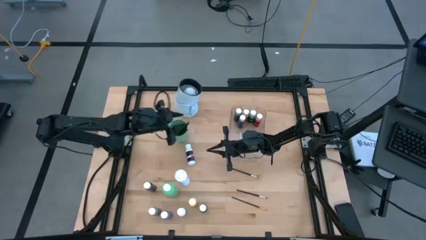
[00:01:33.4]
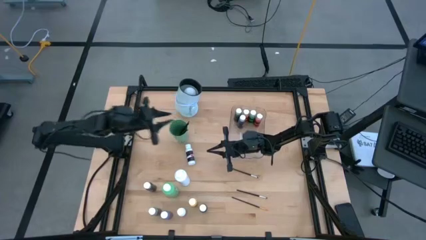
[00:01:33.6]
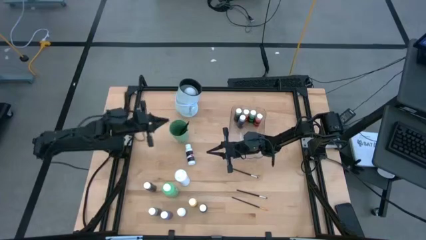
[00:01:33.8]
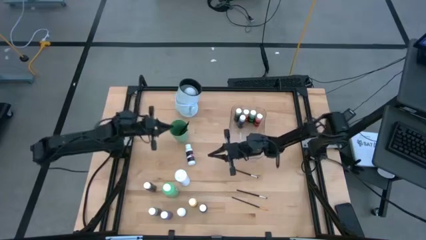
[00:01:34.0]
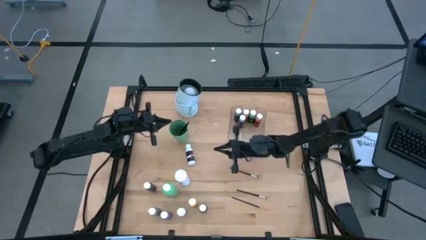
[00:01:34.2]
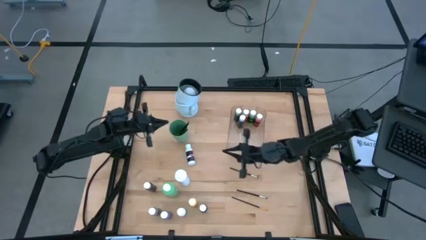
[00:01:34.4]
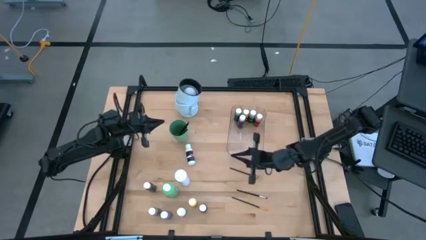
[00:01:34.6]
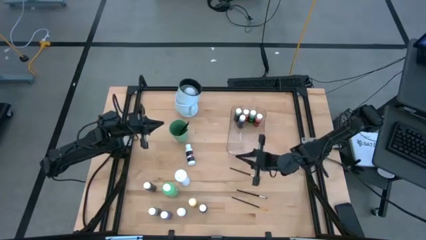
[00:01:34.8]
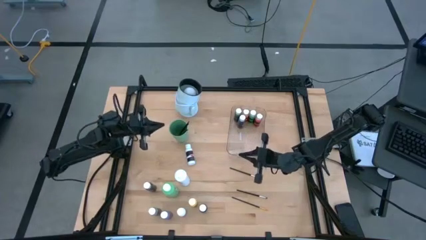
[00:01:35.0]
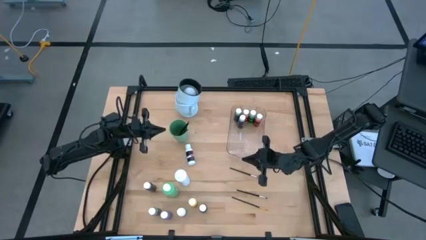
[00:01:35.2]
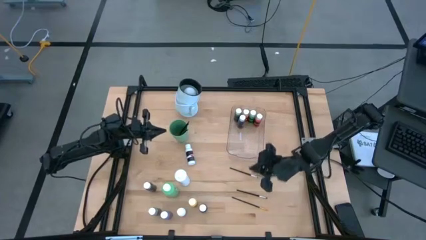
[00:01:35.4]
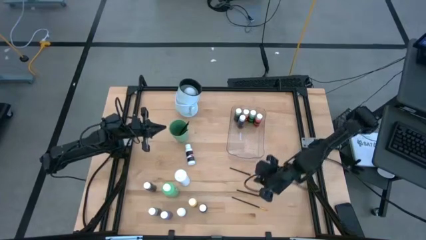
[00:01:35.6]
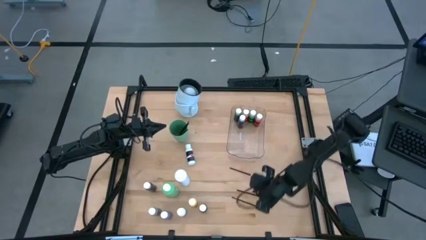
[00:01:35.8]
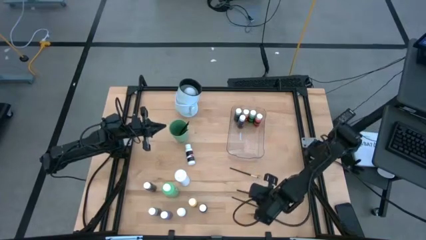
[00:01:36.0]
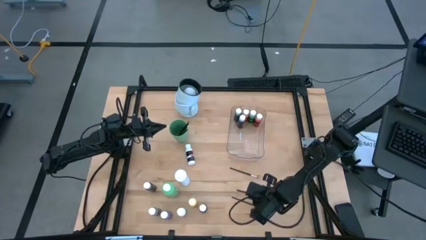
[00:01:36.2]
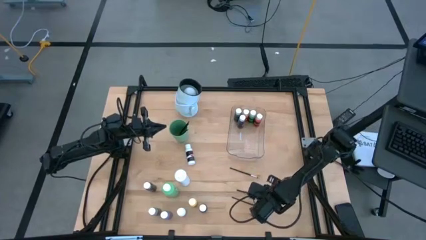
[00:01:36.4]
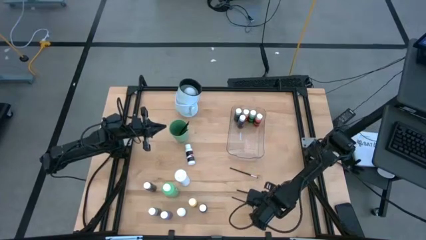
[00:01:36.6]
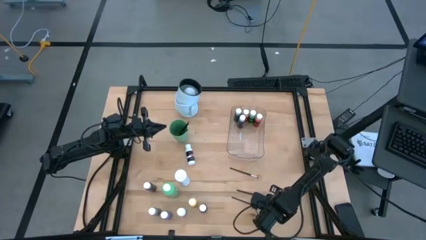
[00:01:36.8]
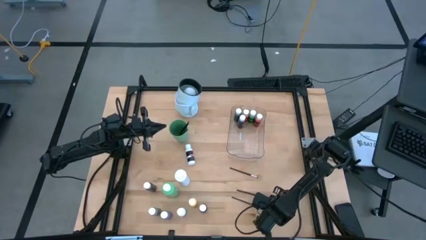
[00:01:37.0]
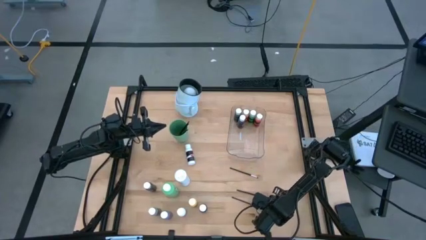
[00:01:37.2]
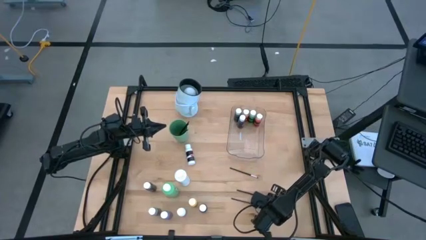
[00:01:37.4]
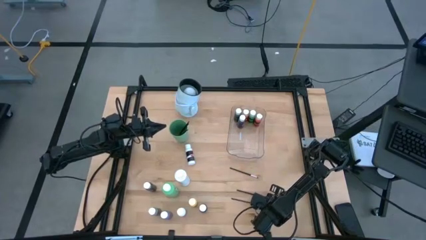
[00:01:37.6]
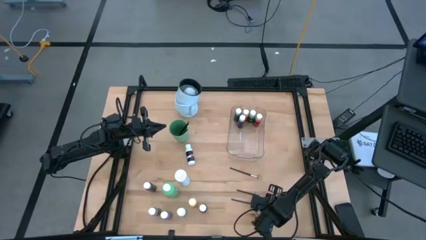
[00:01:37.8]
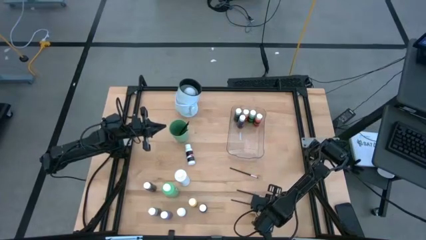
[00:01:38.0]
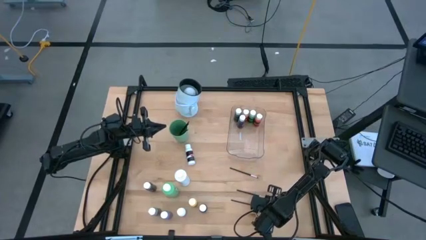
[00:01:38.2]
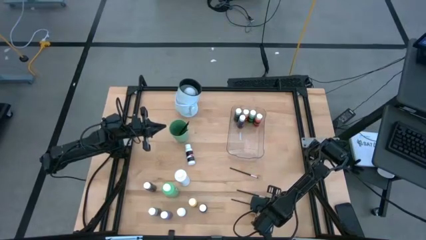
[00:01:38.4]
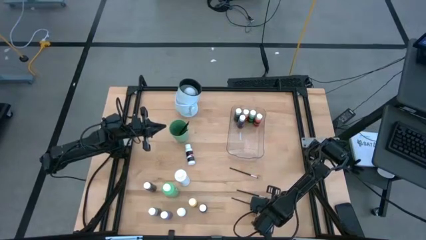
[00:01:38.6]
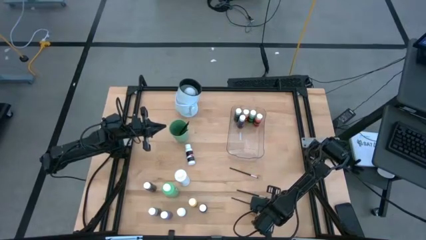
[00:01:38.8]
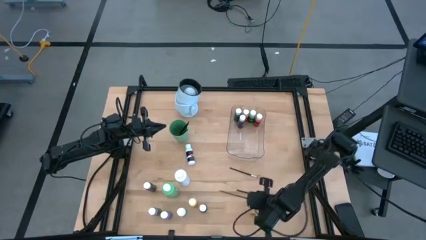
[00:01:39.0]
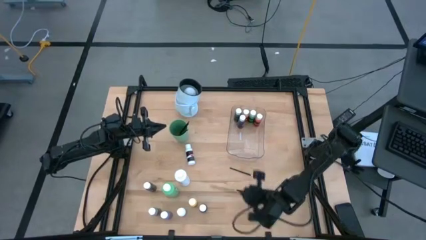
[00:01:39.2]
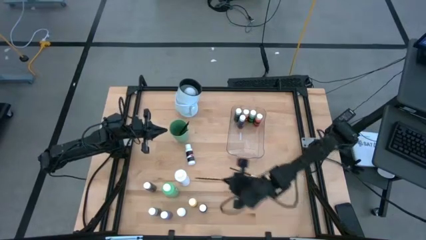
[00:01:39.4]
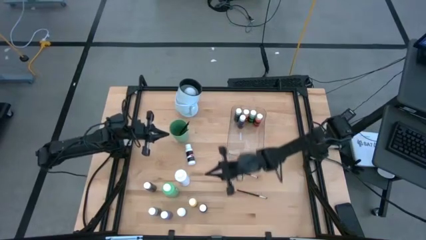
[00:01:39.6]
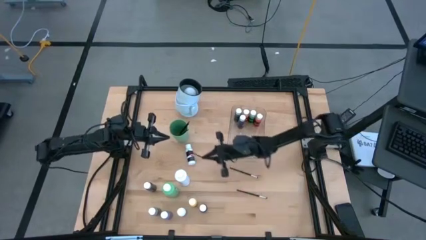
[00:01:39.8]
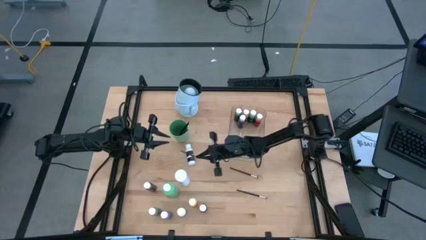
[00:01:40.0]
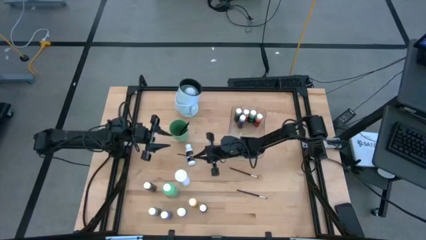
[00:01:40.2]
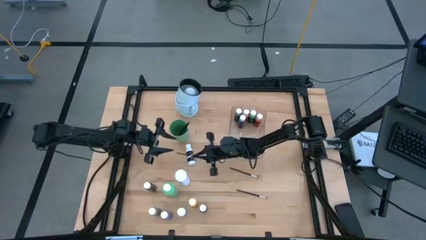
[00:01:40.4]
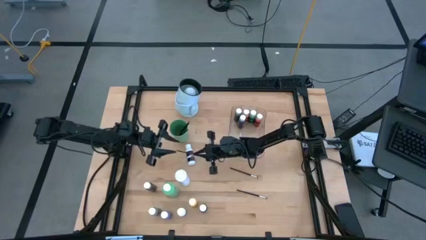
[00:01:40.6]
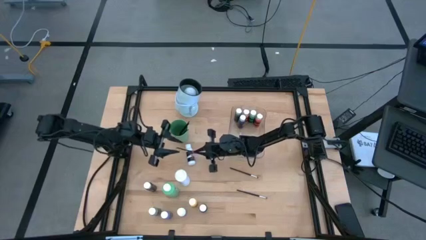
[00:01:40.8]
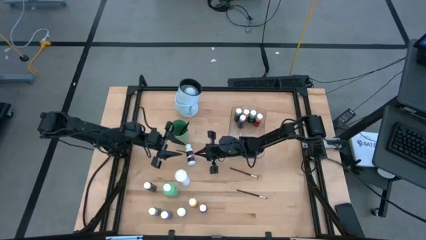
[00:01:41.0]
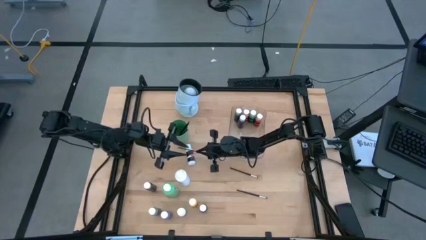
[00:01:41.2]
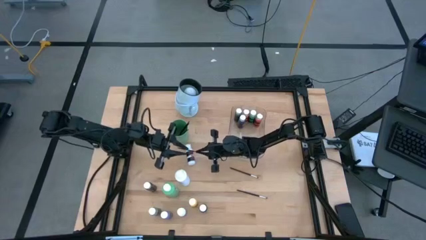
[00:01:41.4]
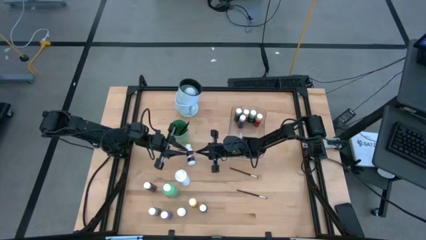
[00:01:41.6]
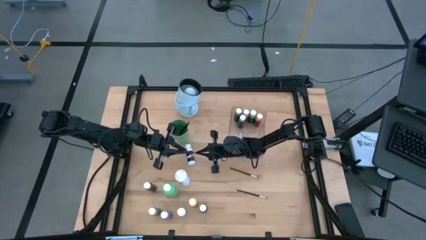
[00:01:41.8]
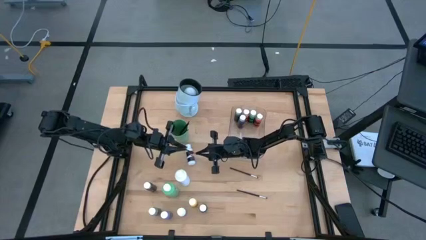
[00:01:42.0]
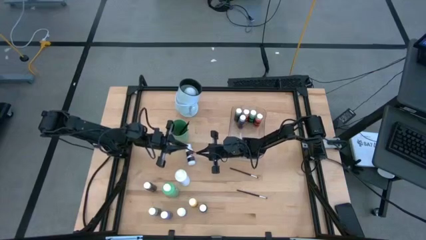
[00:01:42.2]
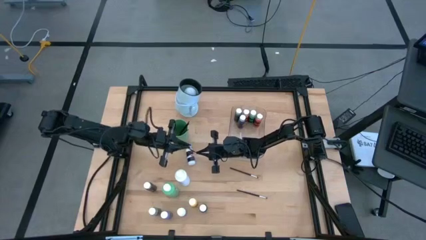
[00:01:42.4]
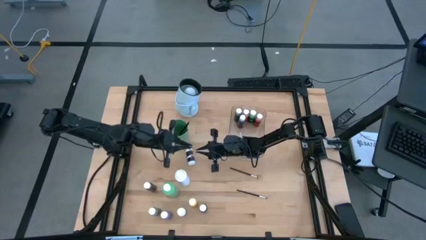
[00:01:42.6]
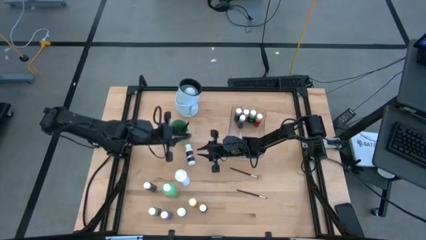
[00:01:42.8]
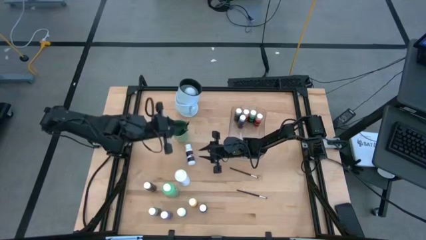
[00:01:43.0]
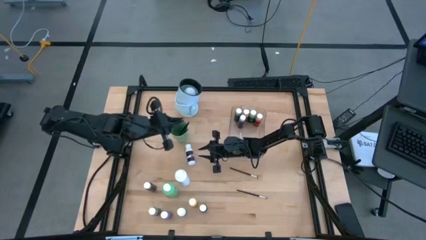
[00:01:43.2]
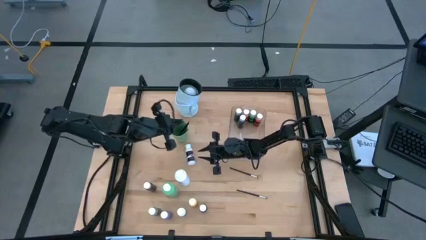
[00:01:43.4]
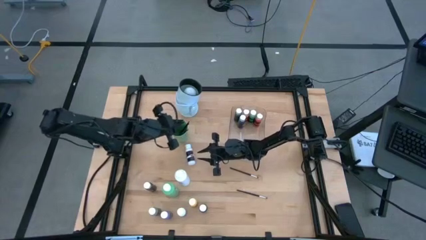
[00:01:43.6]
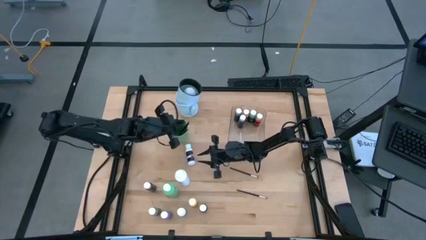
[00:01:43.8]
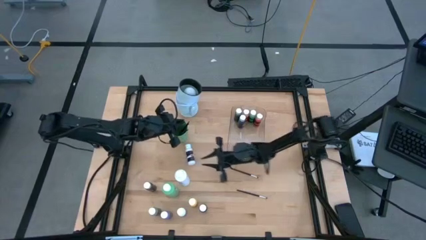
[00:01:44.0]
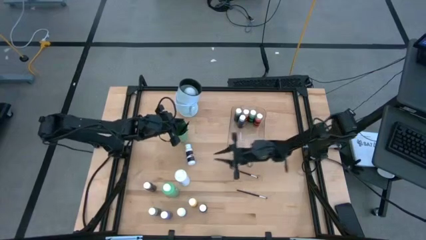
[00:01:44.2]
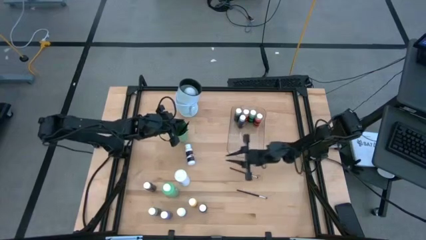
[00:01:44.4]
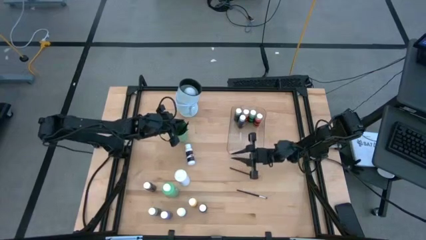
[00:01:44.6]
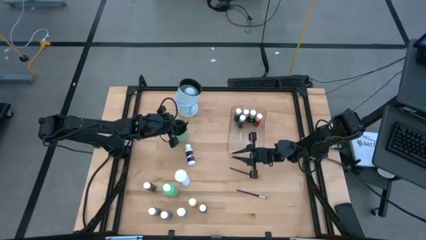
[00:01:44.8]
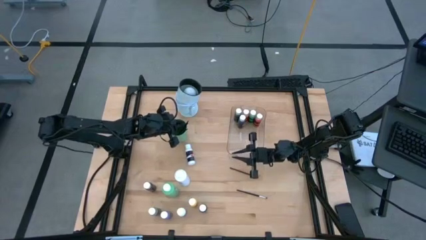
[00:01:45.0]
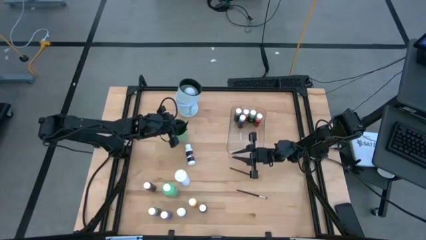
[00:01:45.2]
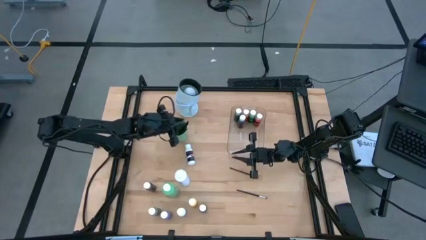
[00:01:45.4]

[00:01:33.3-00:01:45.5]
Task: Pick & Place Paint Supplies
Put the bottom paint brush into the cup
